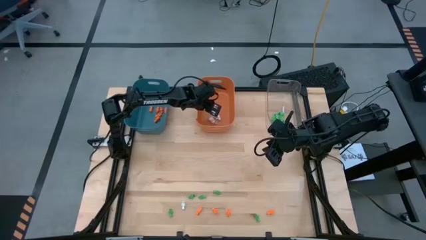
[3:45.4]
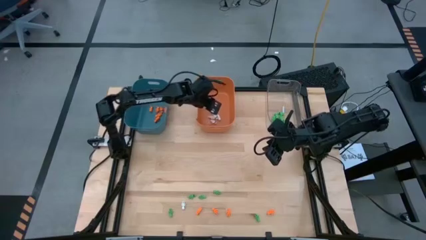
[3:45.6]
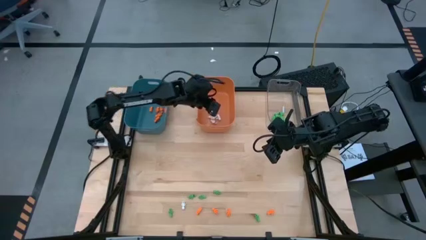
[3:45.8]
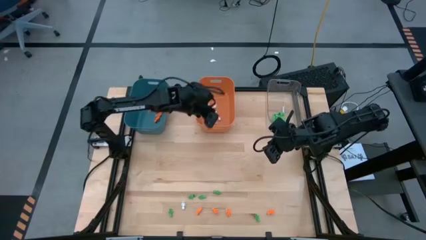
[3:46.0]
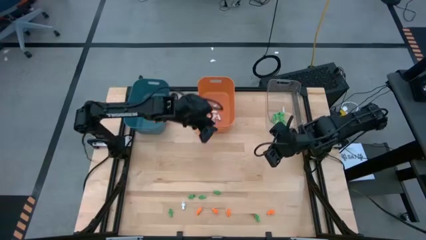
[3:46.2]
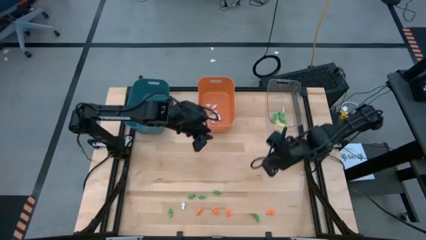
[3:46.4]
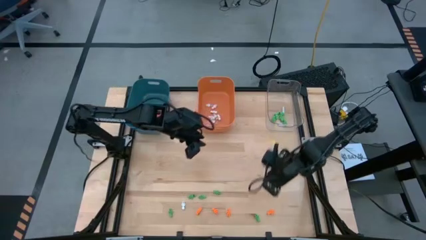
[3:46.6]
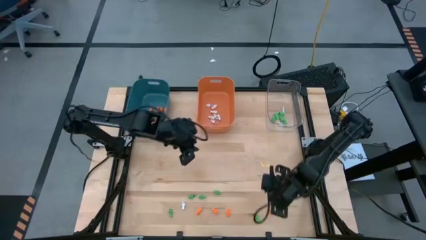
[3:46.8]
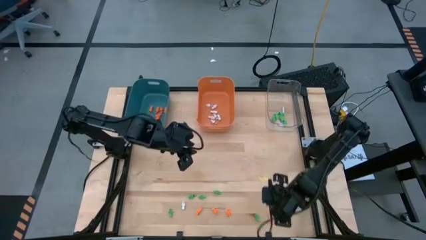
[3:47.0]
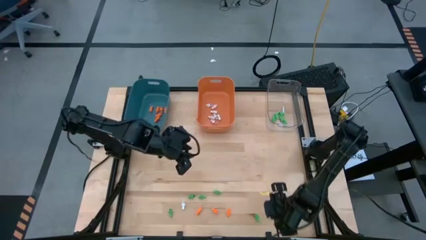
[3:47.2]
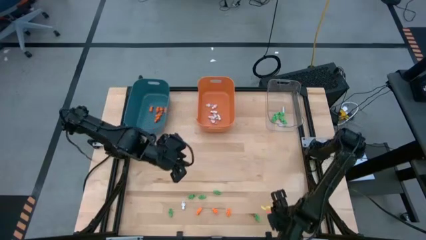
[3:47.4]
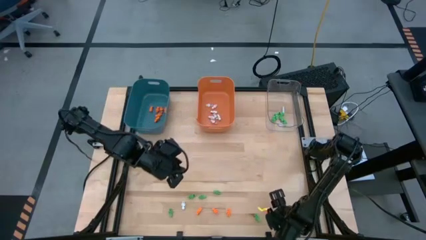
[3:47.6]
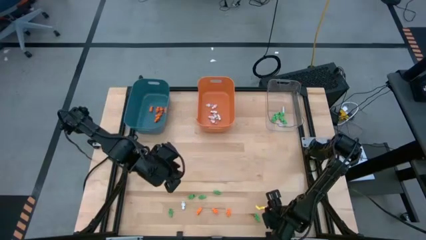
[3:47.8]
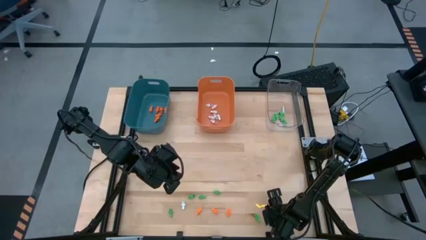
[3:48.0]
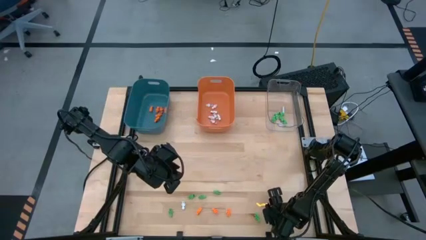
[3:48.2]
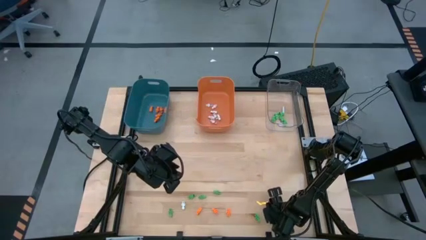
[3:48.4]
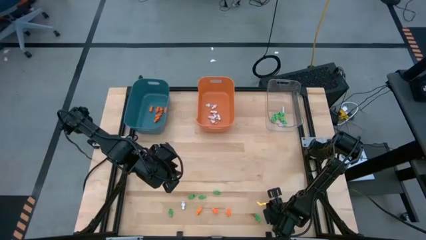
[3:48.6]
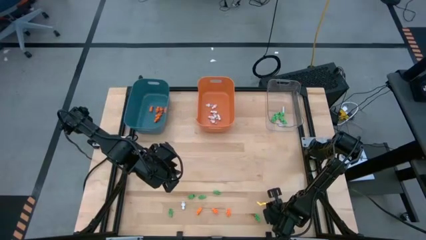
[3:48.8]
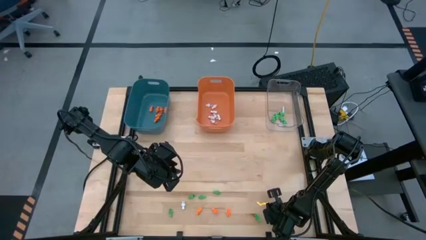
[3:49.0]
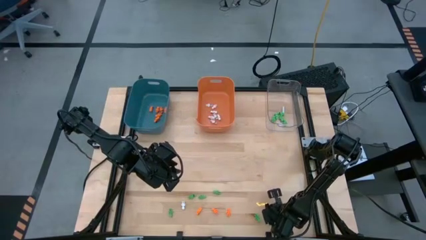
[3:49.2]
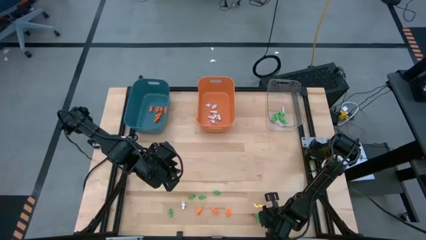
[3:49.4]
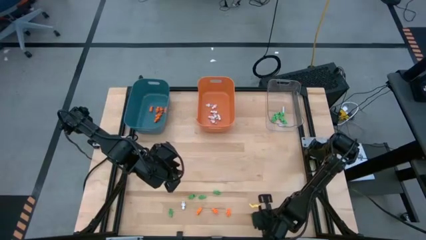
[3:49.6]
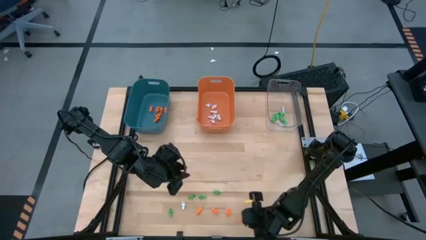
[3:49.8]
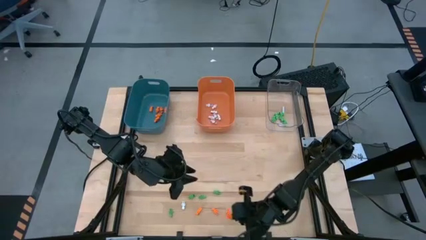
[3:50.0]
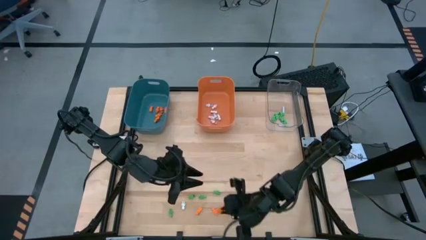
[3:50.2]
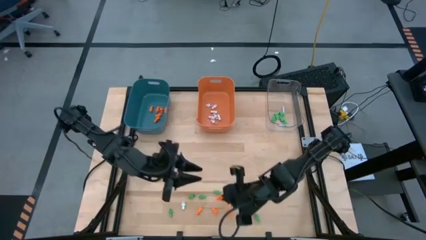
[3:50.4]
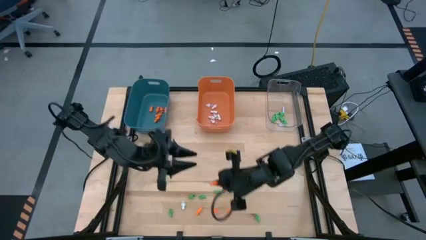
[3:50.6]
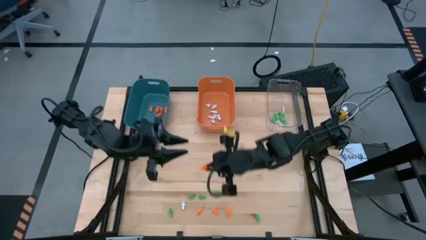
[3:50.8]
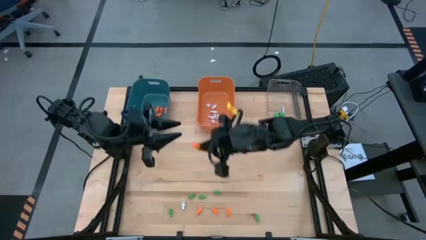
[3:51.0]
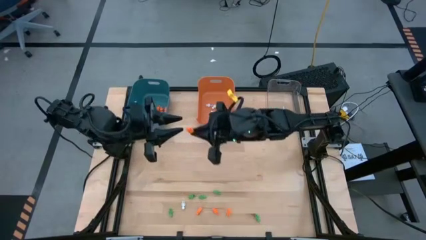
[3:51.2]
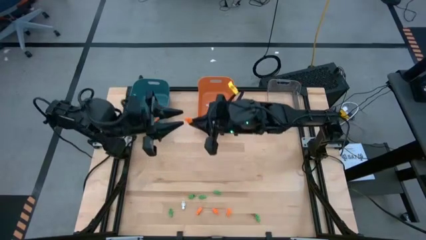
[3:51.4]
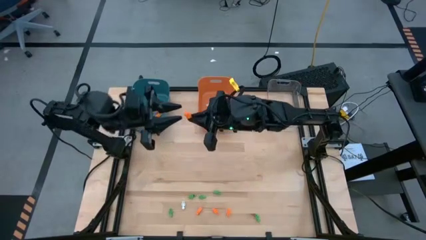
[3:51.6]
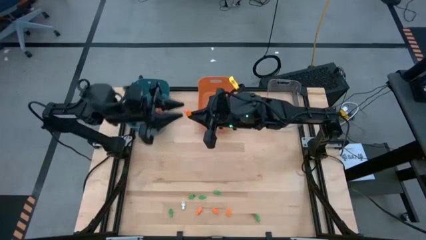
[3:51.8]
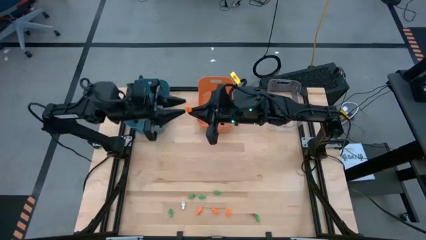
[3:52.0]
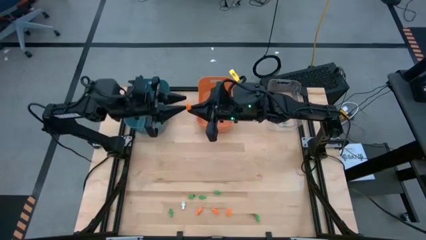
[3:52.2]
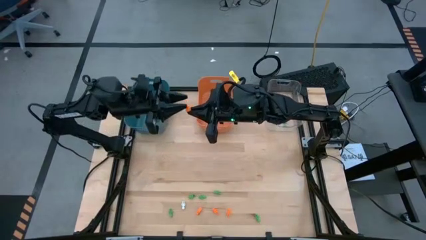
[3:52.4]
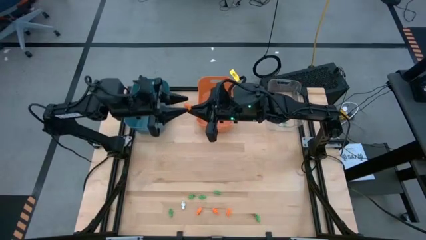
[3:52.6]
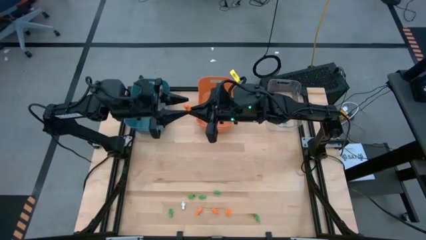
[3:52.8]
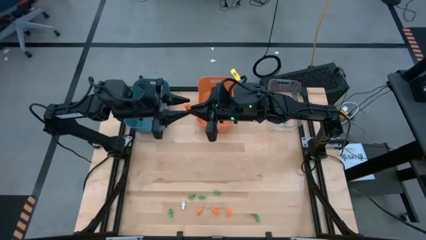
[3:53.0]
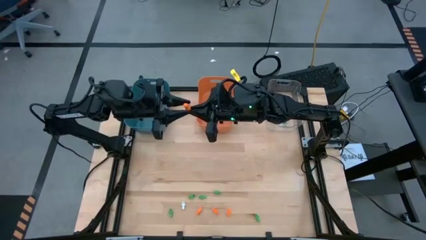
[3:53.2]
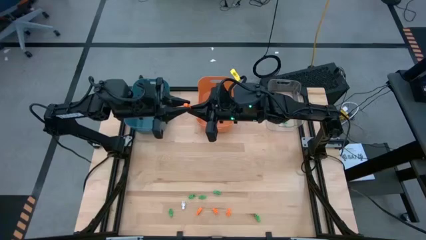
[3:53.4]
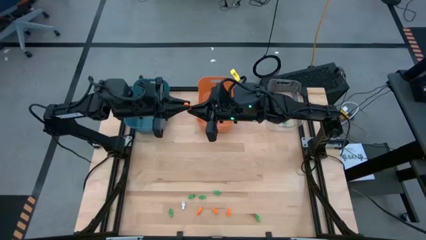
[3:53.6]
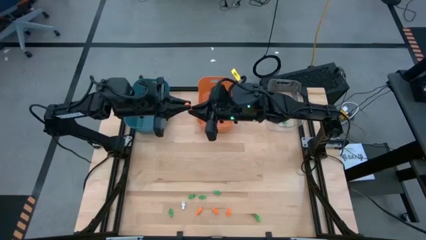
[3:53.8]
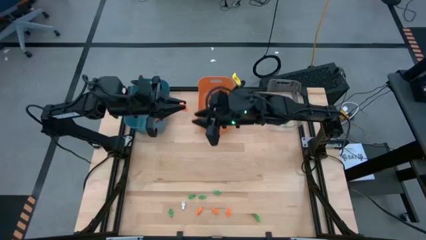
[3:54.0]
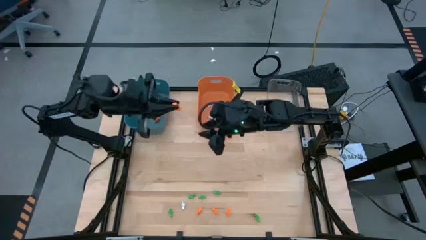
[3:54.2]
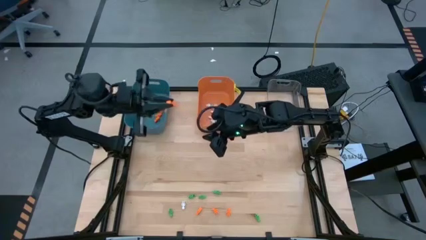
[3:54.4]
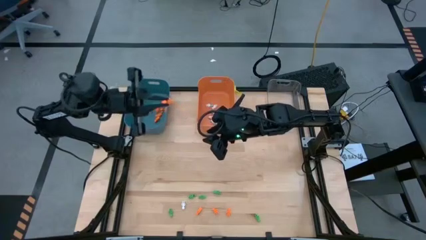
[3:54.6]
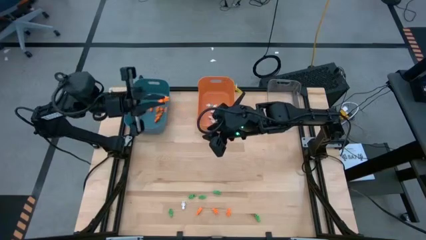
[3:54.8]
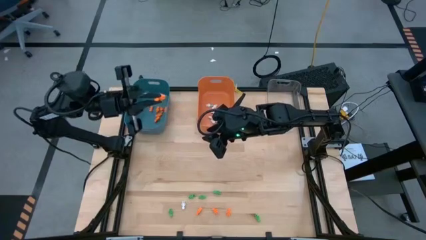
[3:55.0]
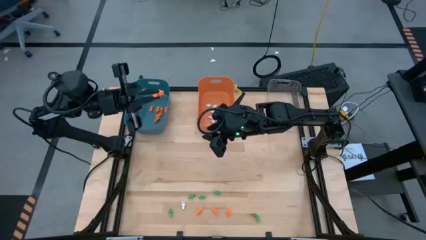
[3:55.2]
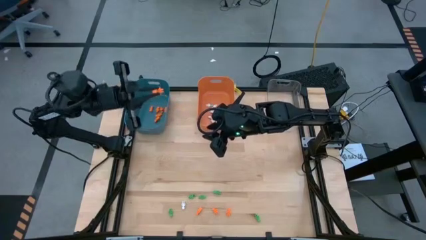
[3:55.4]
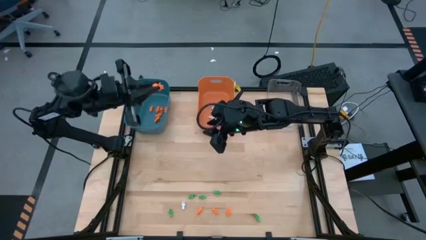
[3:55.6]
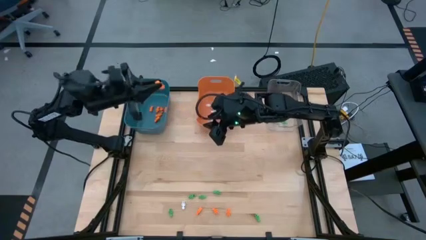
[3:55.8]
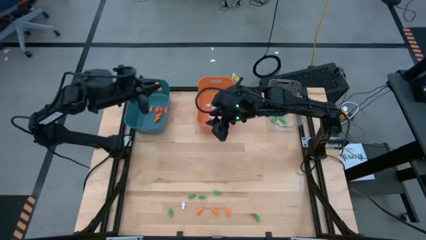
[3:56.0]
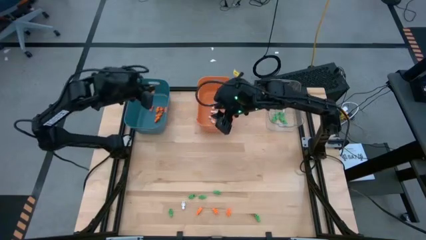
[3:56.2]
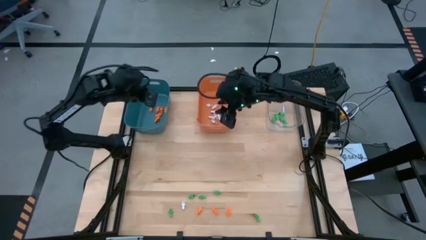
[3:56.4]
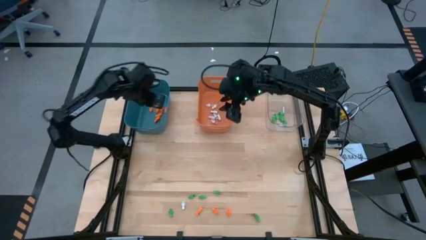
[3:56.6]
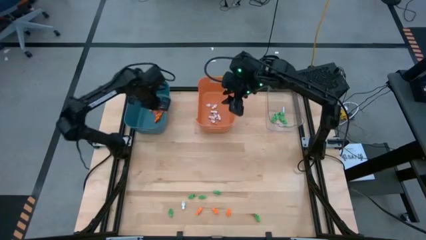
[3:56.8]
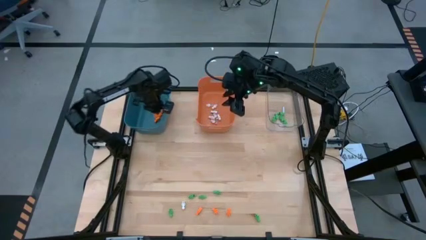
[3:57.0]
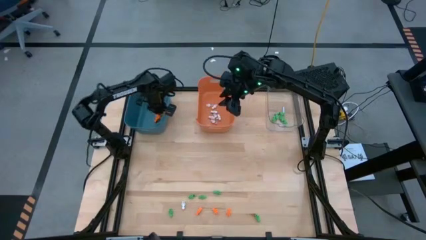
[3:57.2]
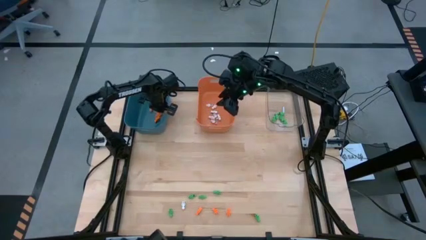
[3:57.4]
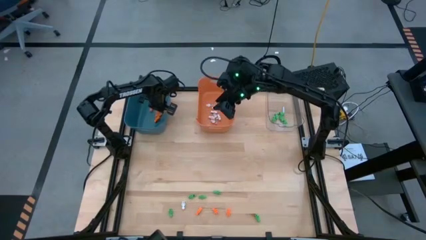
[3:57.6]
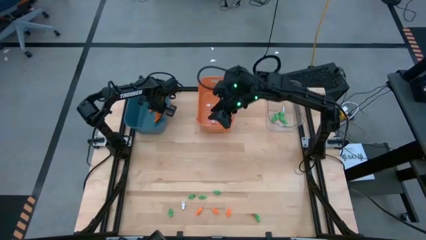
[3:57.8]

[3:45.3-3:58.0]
Task: Sort Halloween decoration
Put the orange skeleton toy into the blue bin
